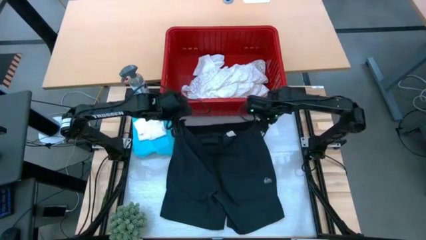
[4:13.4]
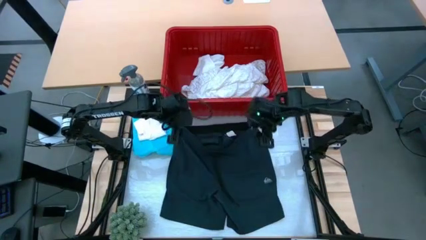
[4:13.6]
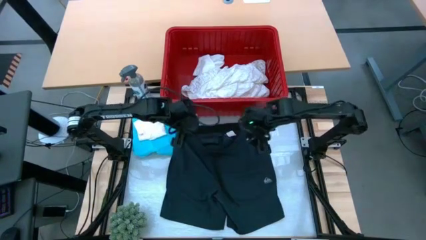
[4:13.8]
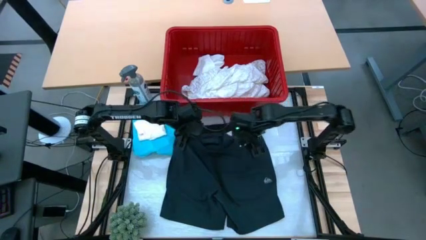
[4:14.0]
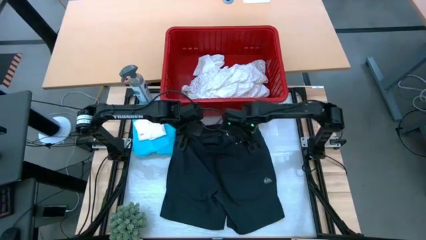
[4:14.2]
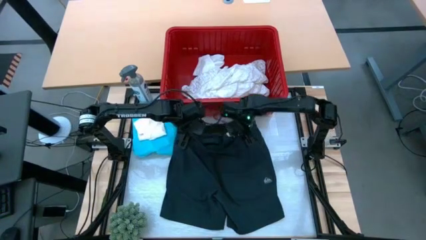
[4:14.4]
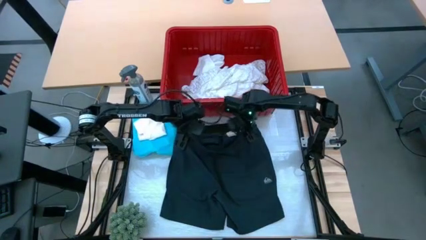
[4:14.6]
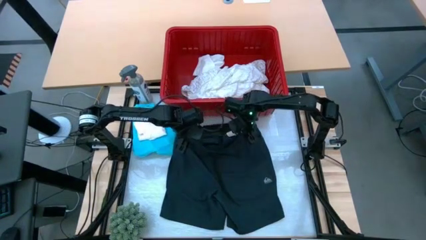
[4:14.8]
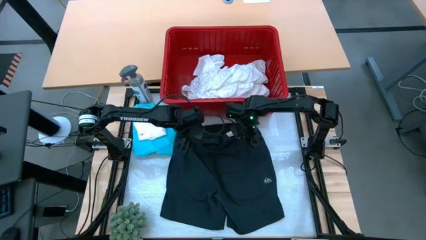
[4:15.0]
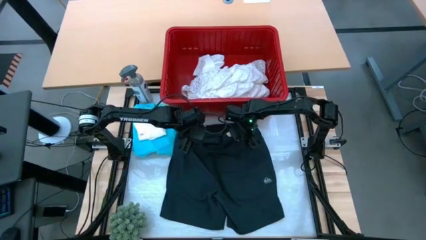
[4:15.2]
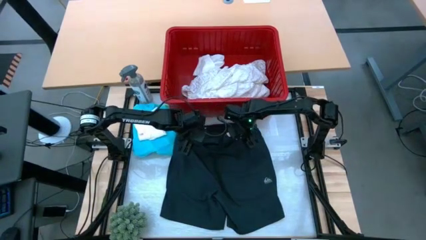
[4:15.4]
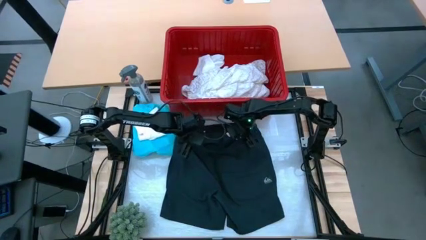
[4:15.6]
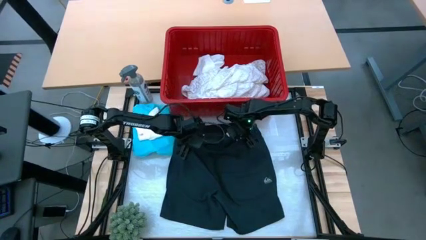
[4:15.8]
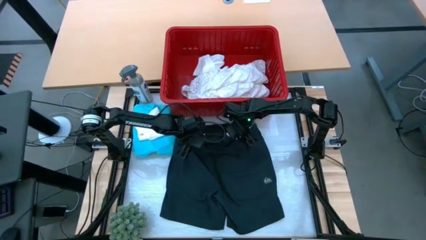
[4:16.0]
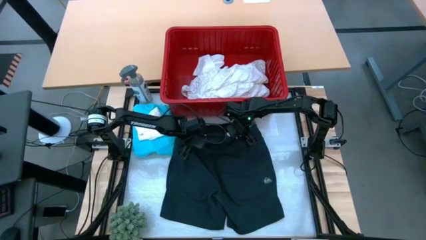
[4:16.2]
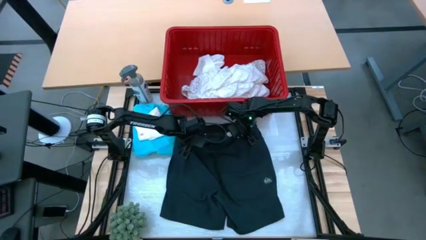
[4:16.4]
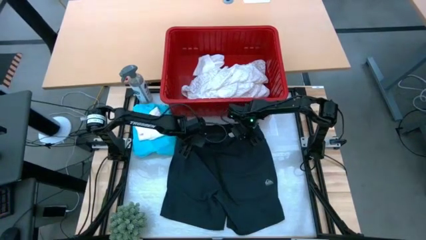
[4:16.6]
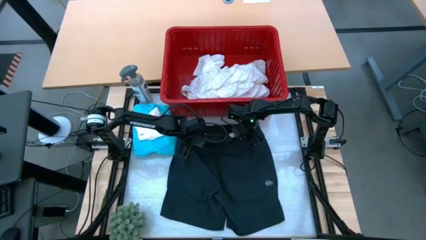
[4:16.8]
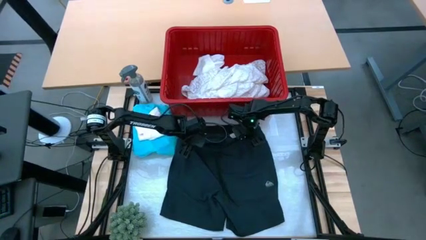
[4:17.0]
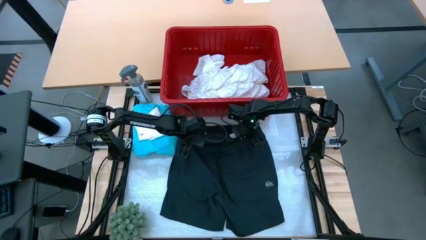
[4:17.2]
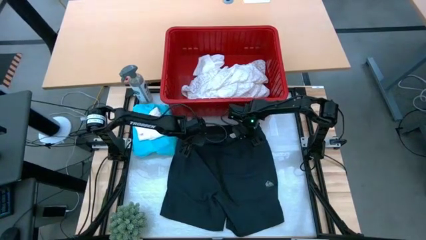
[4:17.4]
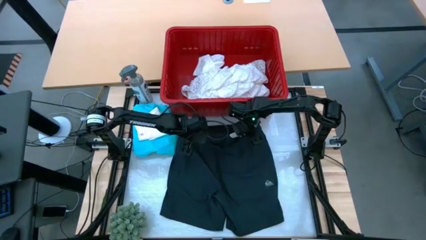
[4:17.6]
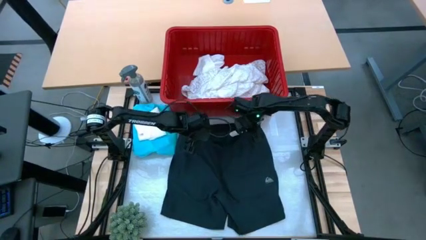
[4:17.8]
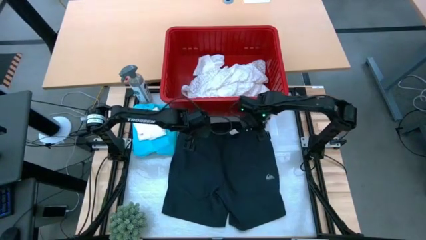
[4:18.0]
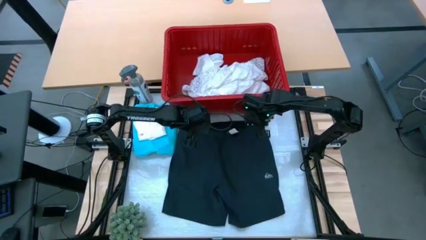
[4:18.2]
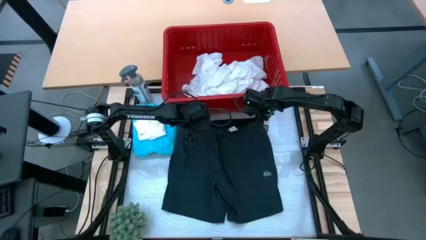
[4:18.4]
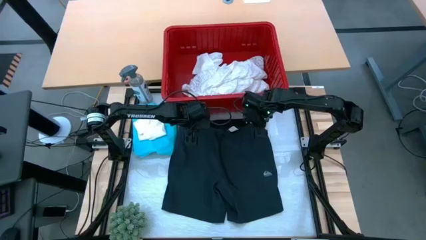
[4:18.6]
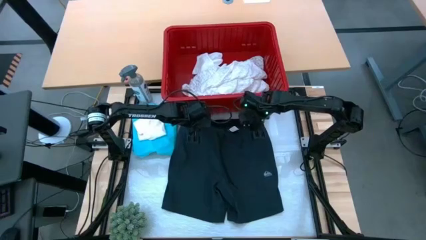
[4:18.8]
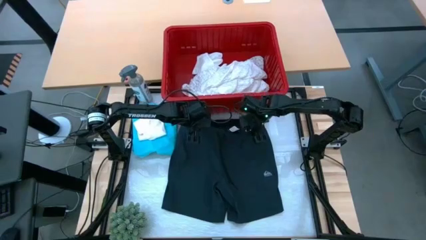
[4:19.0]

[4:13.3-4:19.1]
Task: Fold laundry
Fold the black shorts

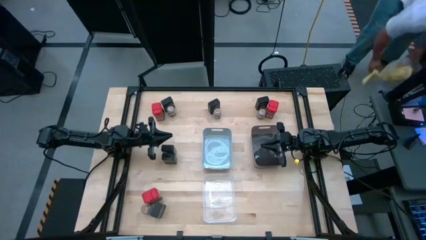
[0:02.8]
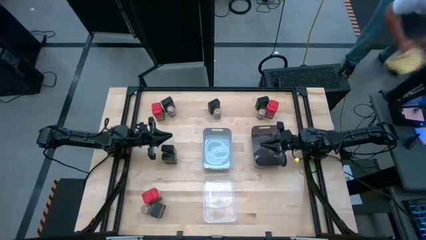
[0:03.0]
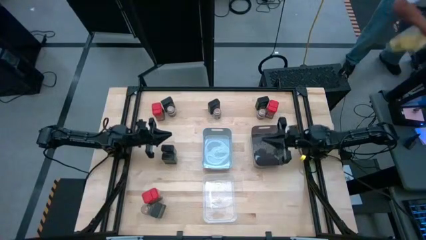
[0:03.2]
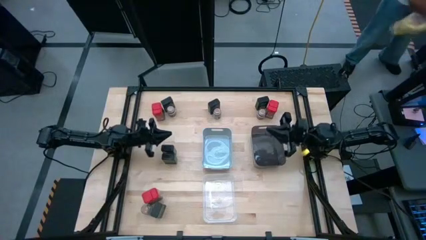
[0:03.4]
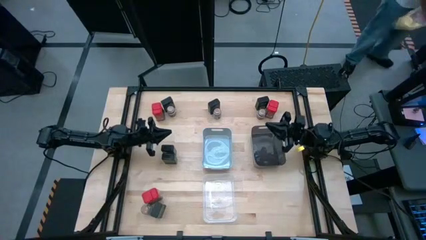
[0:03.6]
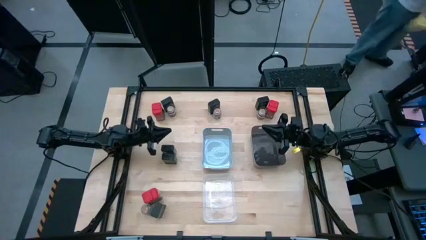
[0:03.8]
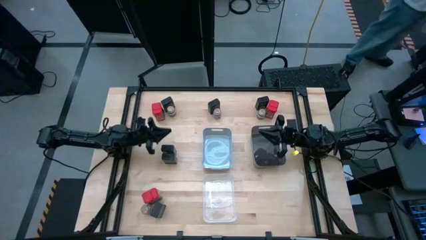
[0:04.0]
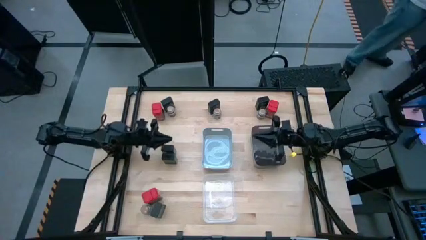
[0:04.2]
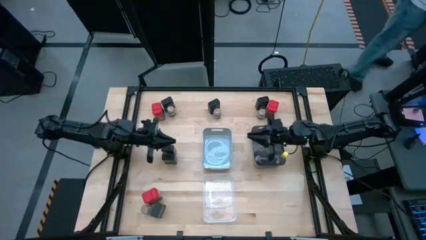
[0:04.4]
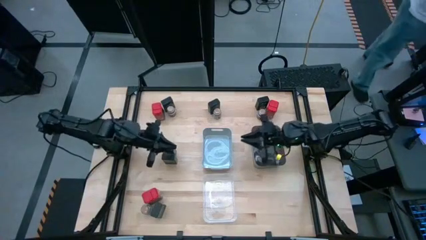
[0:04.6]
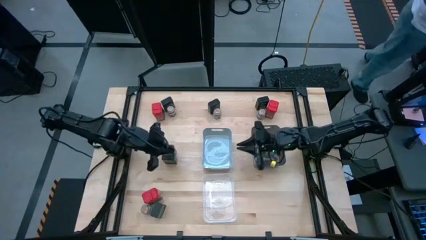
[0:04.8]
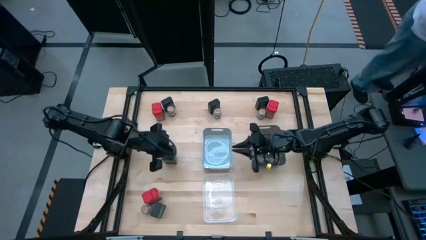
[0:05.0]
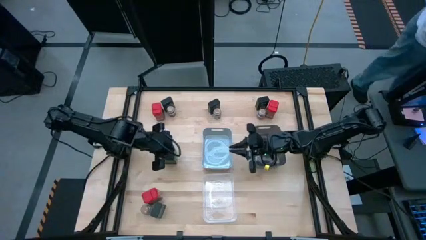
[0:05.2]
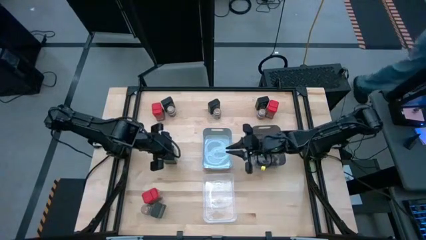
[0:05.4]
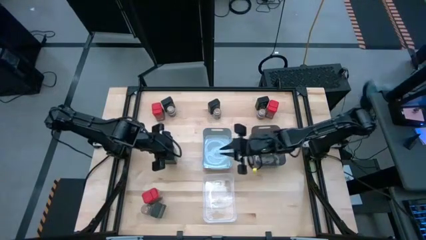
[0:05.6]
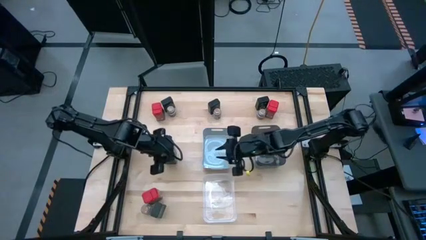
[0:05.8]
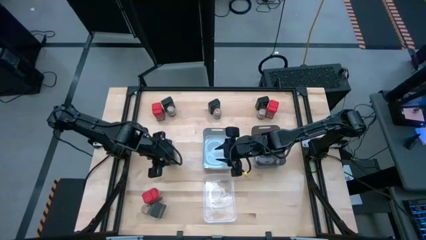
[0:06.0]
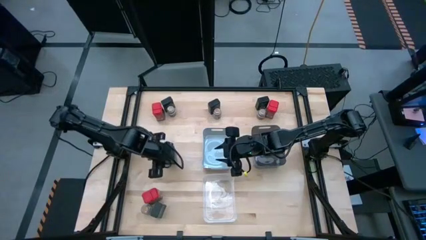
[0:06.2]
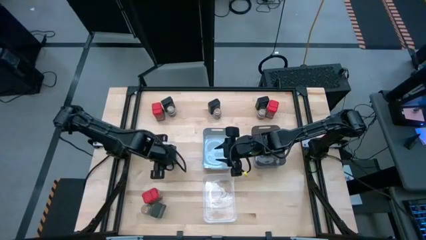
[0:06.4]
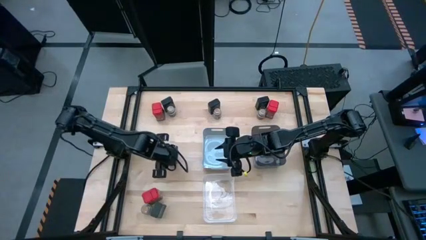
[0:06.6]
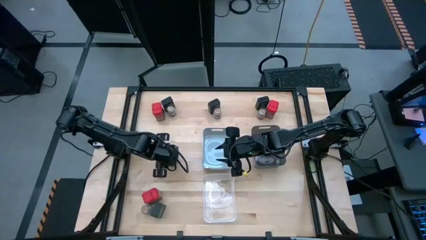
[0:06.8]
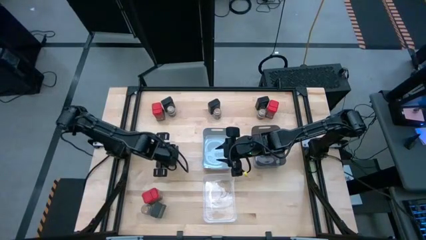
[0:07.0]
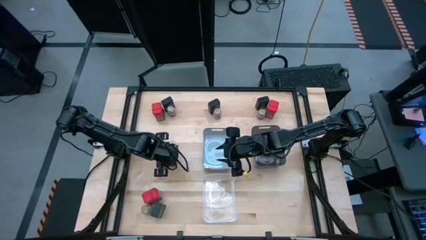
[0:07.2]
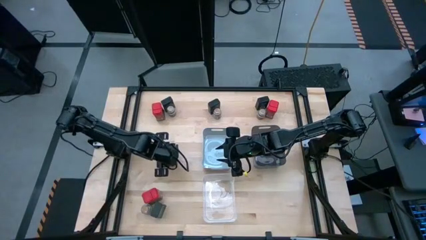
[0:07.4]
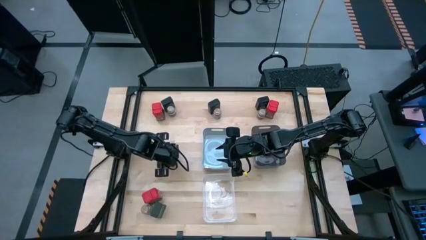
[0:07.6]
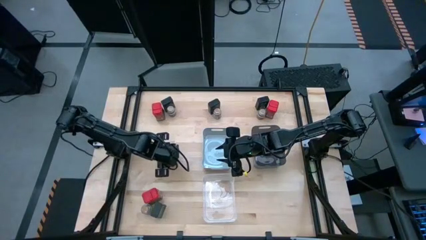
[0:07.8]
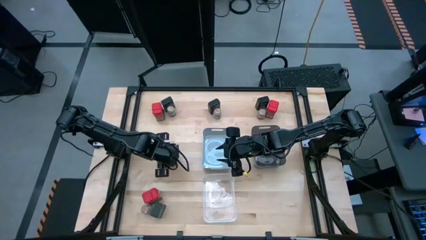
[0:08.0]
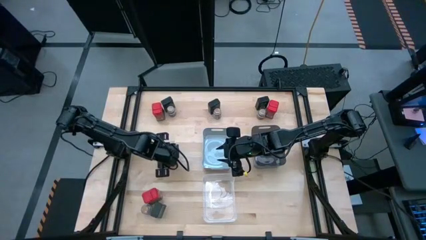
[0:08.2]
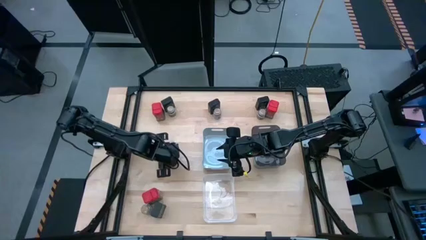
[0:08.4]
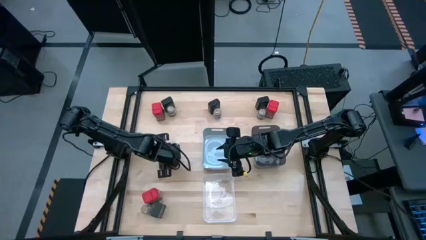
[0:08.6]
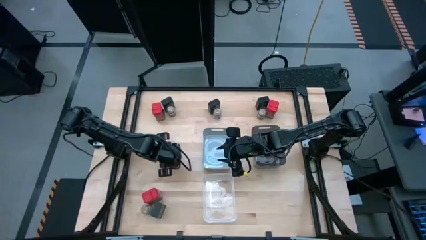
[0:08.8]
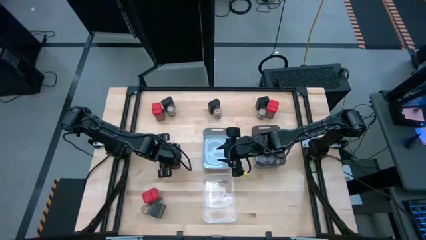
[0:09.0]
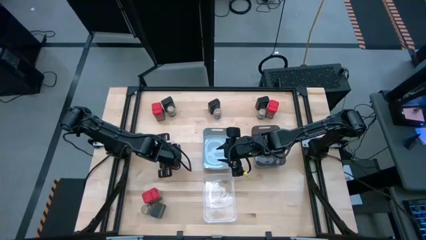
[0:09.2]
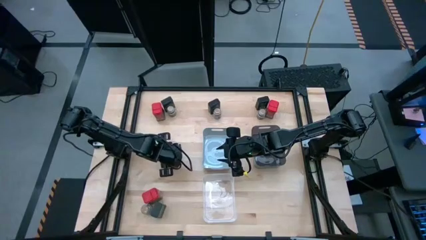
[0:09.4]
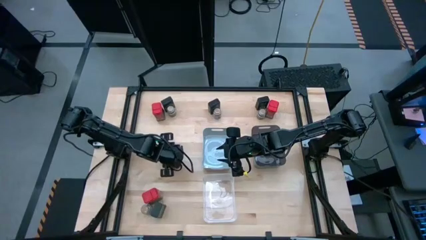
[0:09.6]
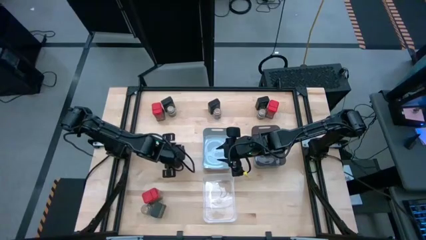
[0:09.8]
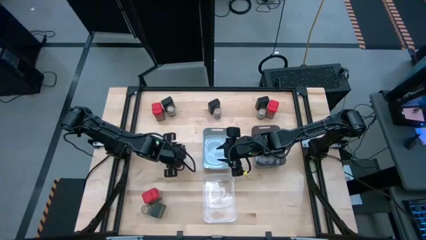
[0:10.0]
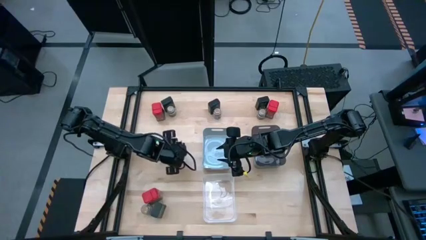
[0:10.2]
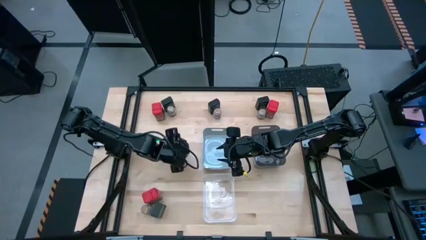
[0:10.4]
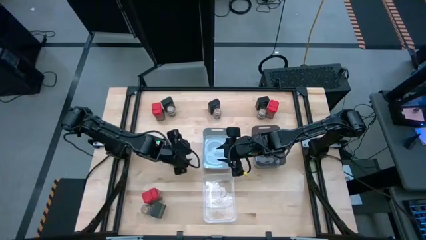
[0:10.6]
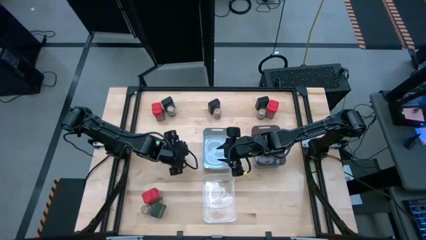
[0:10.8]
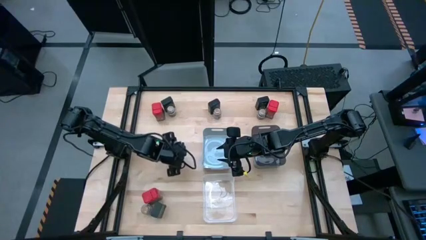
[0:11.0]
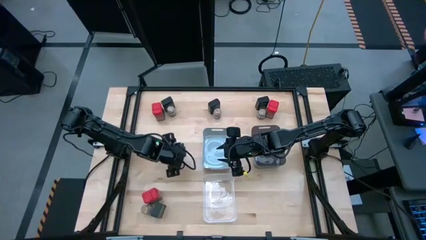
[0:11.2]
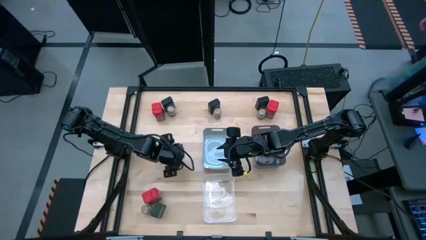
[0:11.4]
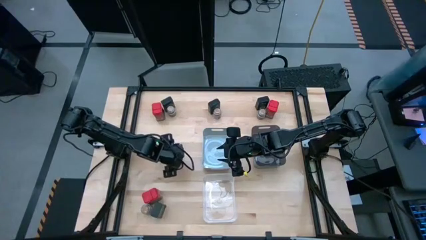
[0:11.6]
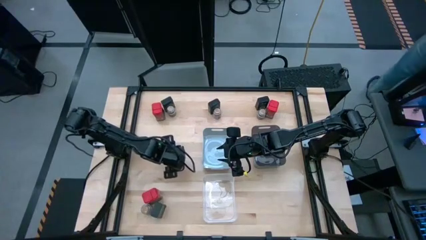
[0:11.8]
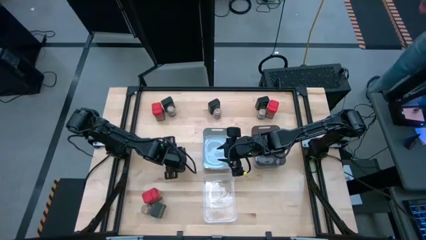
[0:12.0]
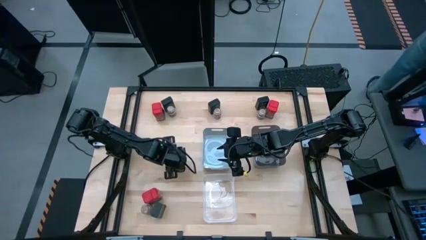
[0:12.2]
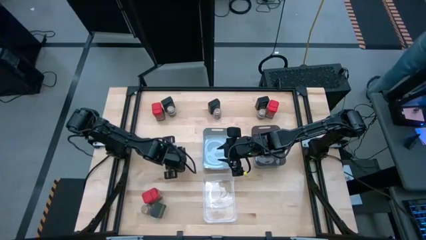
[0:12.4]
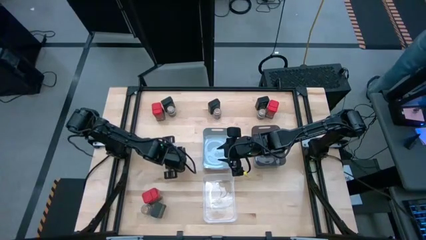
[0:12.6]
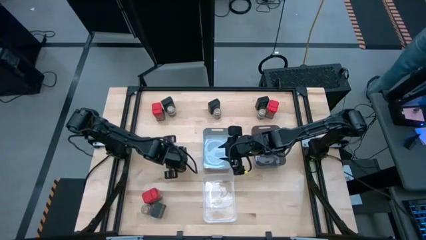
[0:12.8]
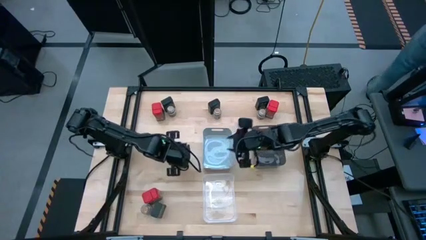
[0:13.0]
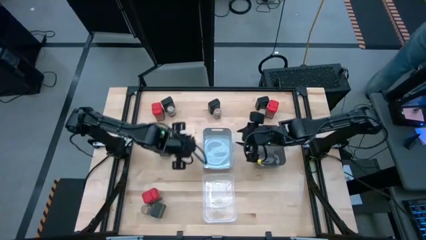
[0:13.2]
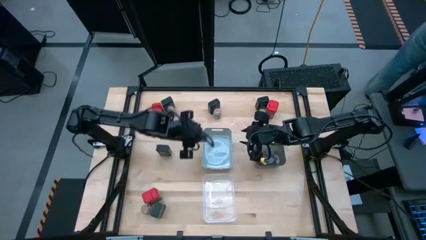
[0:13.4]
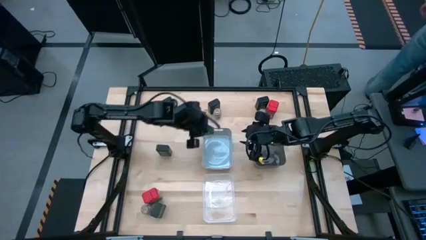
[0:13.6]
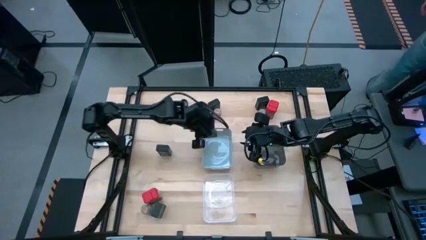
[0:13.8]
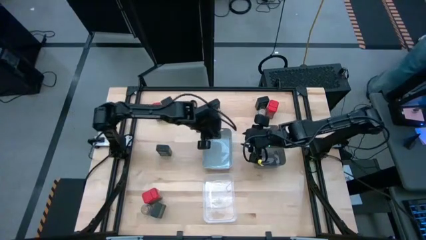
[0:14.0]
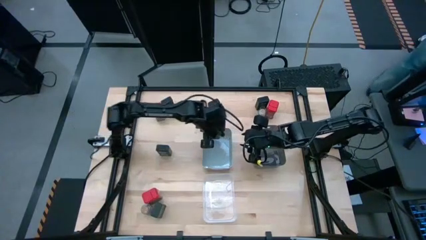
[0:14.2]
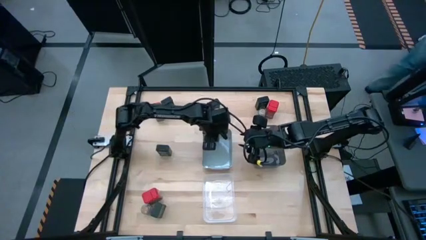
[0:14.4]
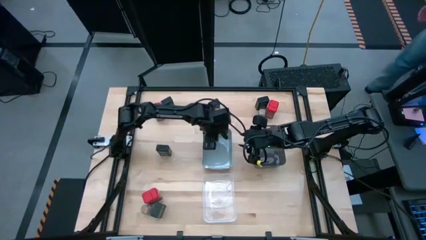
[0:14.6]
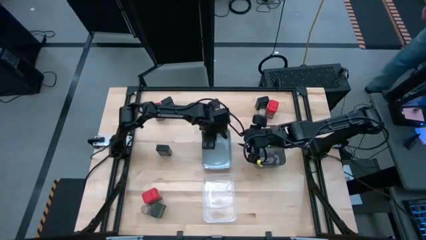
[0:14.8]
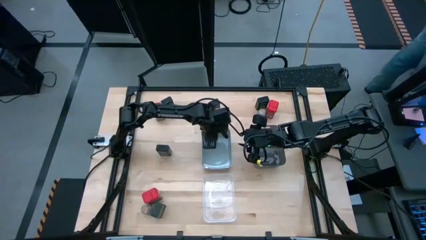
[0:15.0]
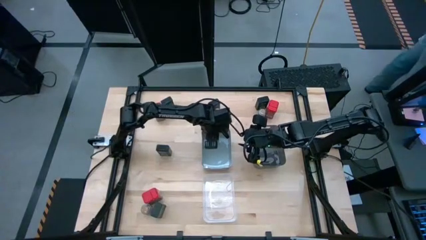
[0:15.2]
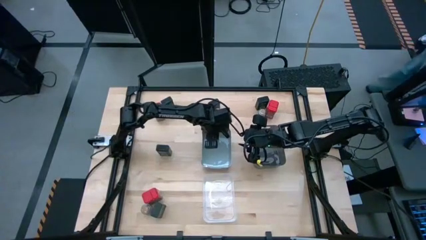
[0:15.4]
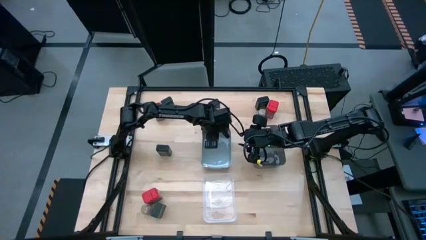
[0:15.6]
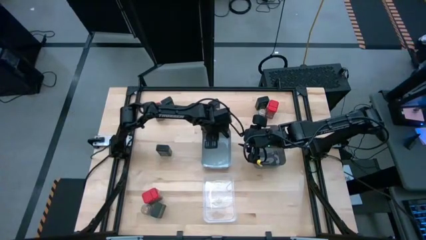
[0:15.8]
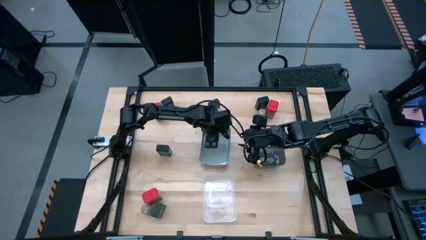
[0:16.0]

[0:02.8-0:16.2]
Task: Sort spices by type
Put the black spice can into the gray bin
